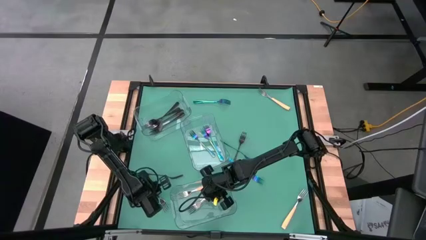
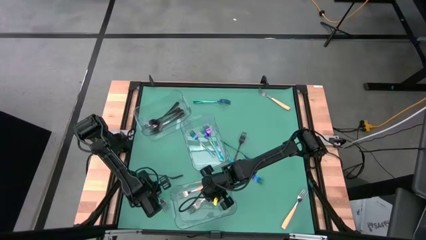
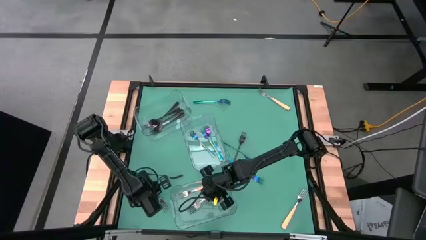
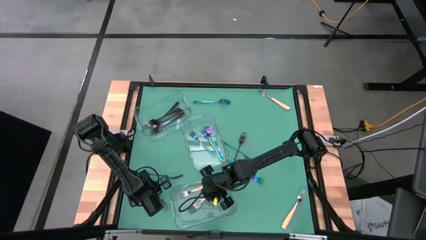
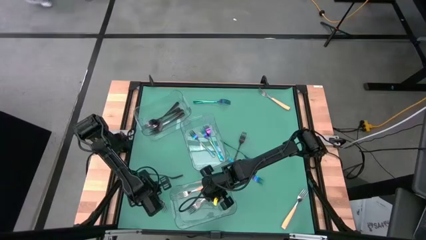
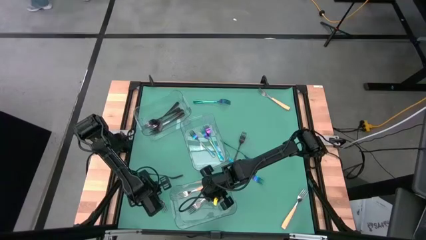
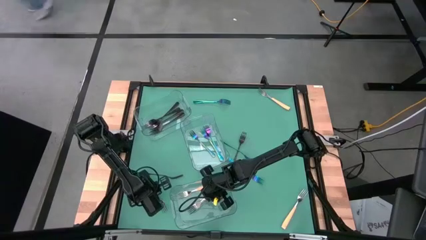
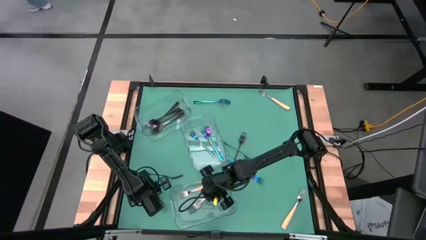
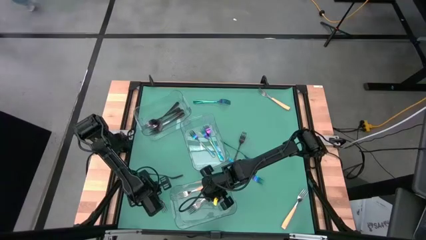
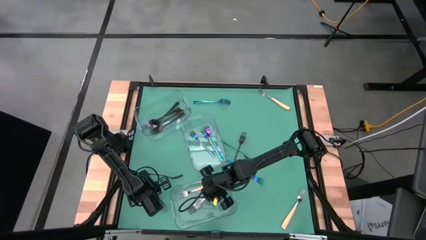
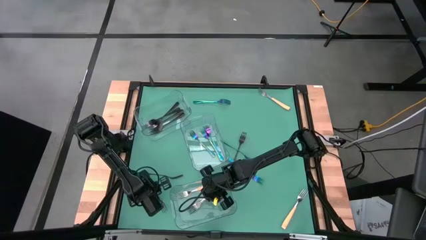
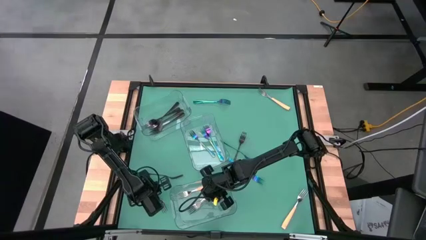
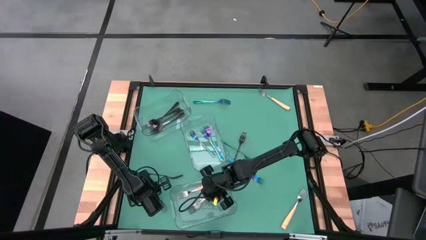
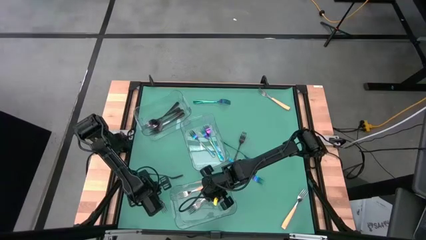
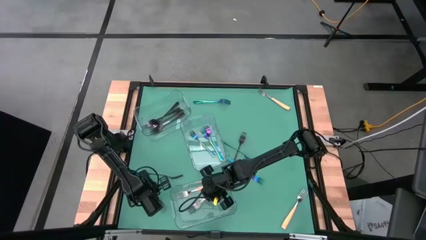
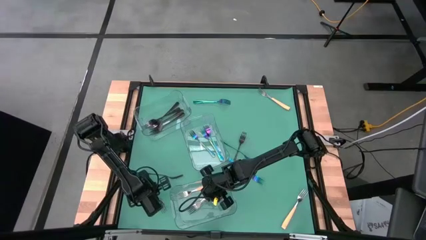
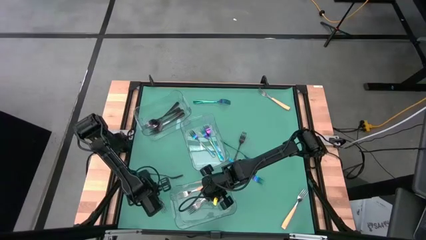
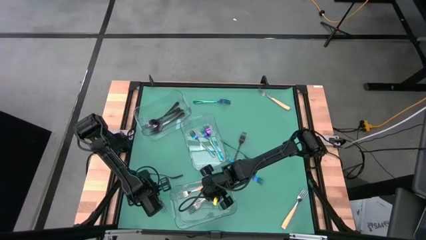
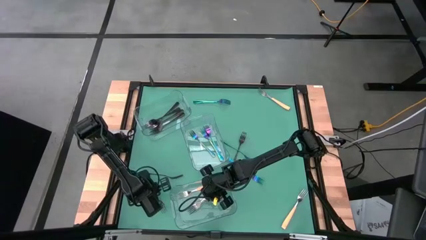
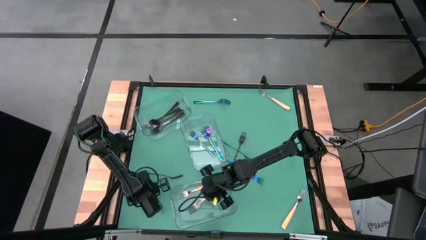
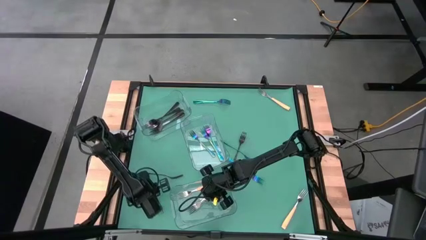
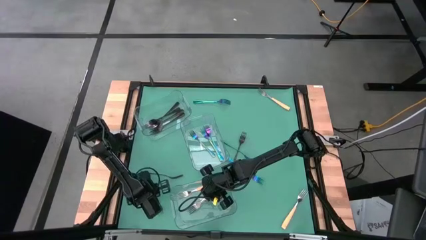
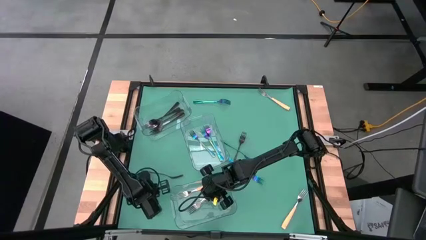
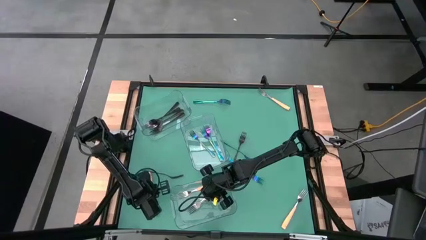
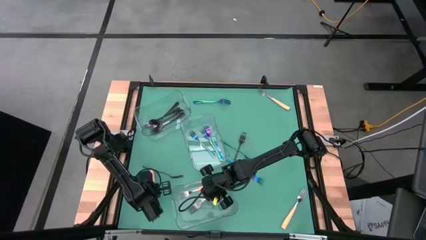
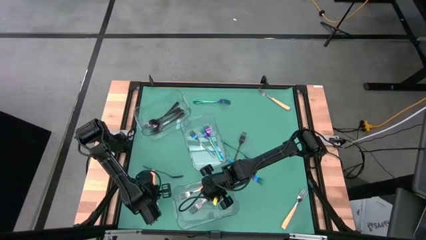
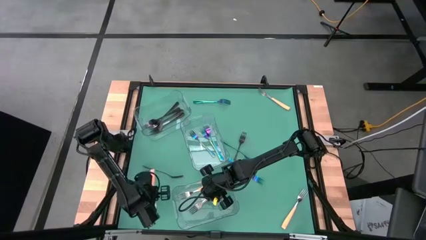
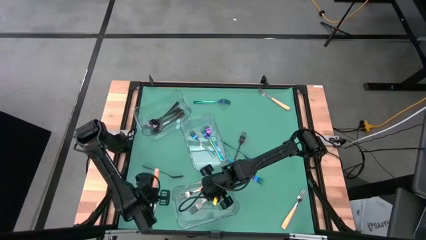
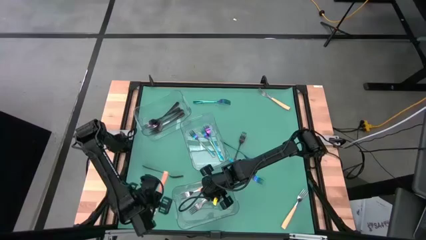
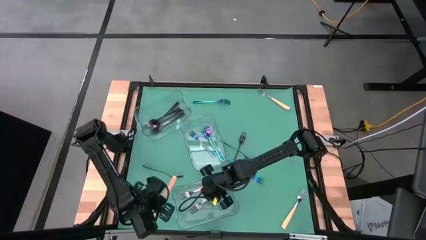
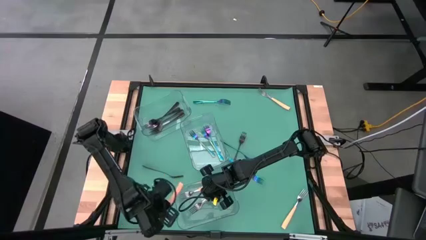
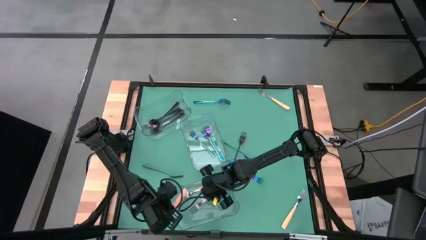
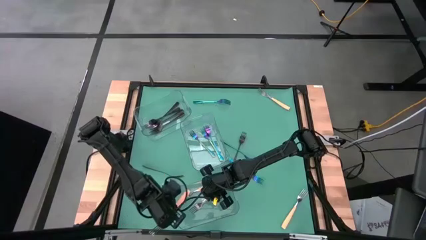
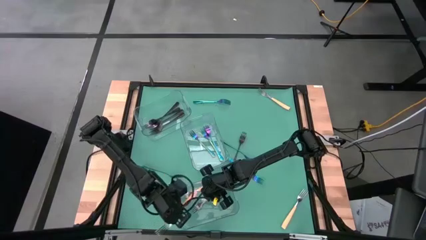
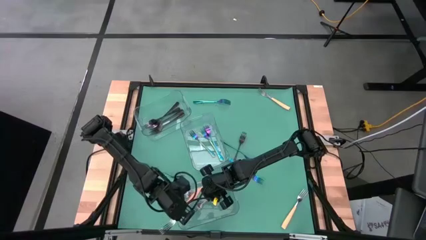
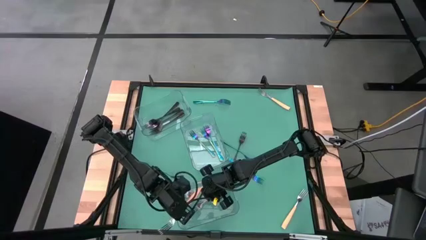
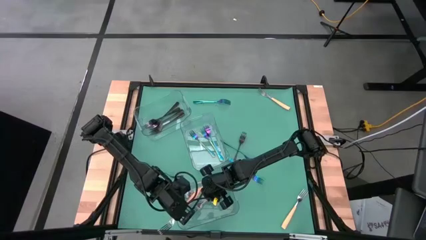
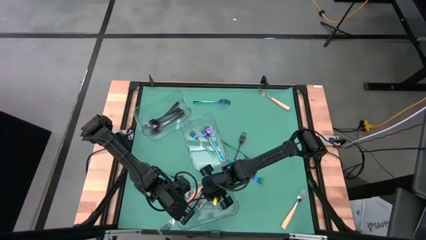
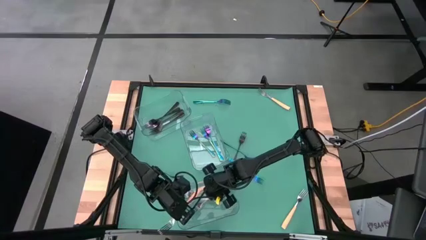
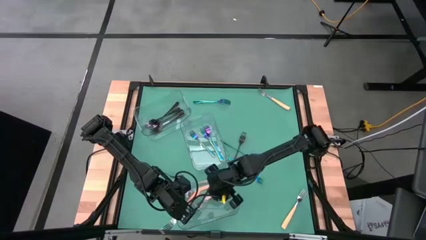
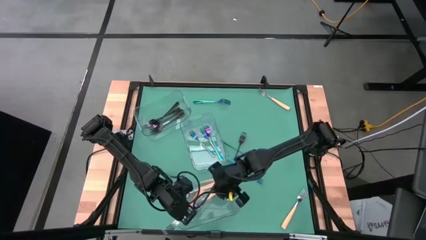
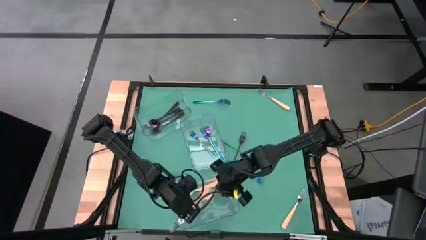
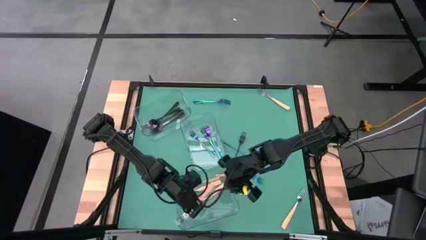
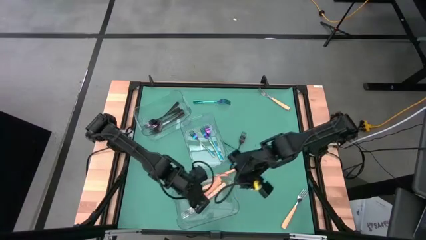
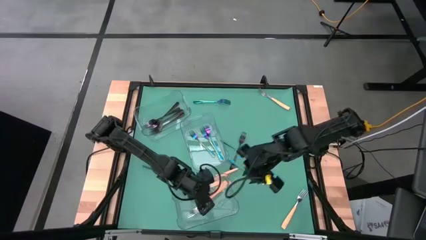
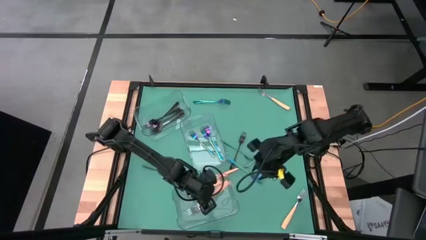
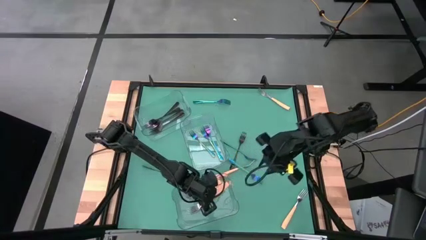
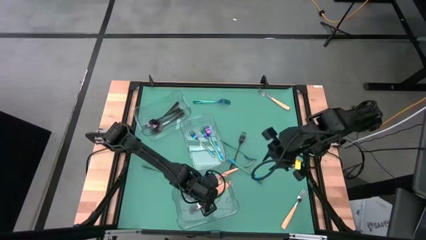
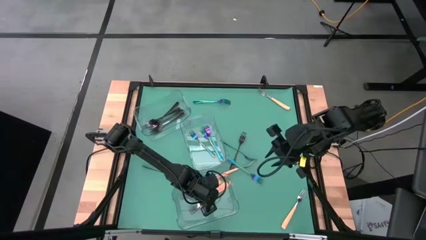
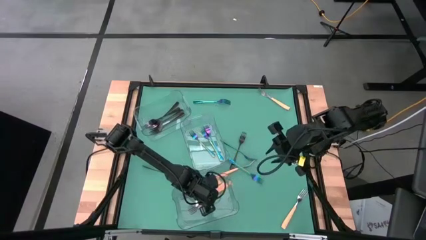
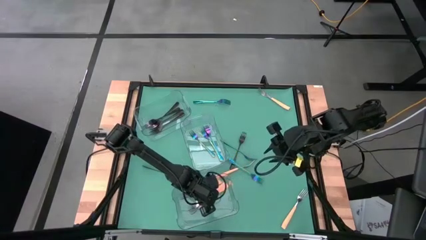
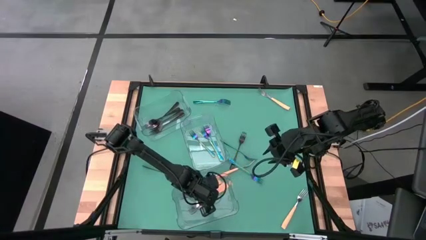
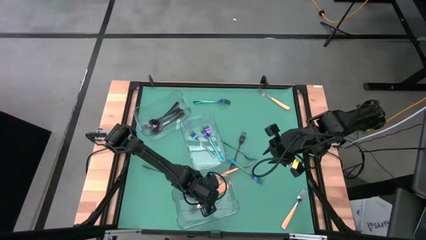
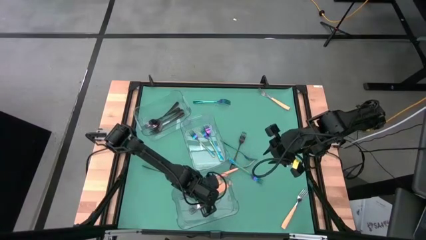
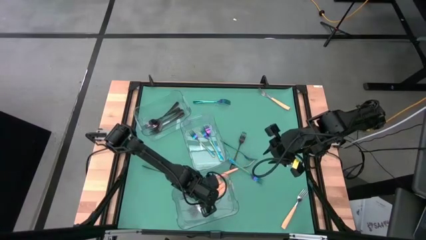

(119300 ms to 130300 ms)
Task: Sort silverware by color (type)
Put the yellow fork into the bottom transparent bin

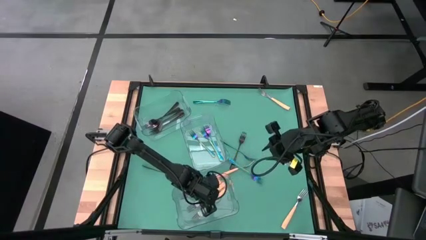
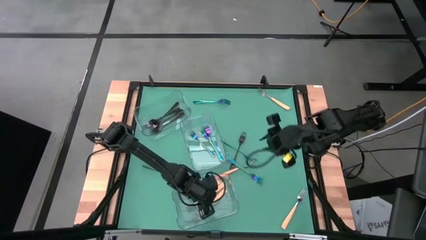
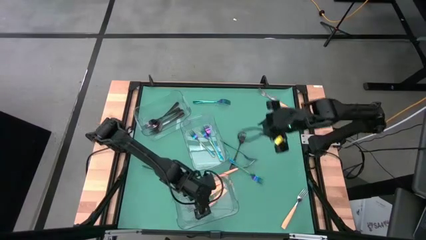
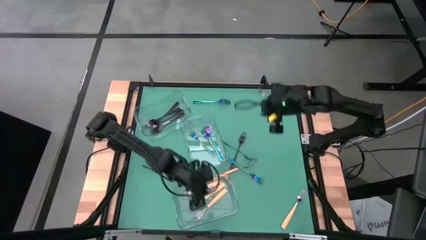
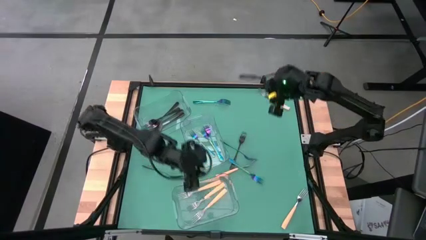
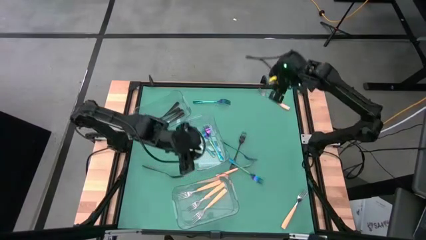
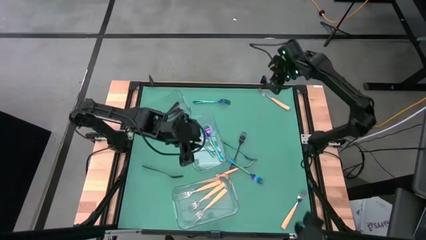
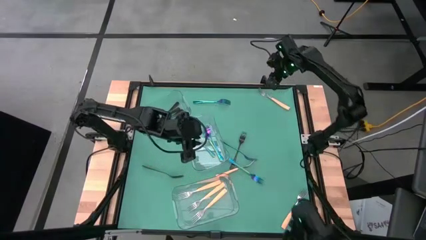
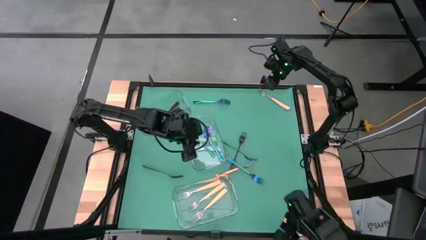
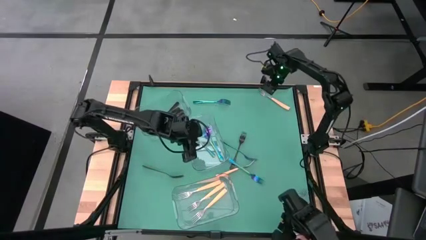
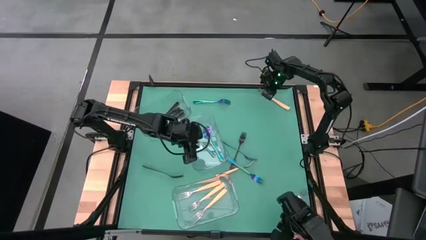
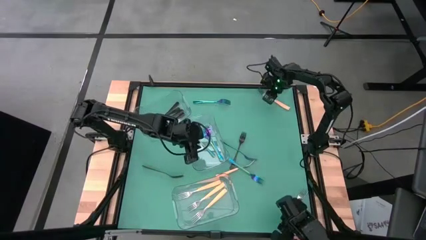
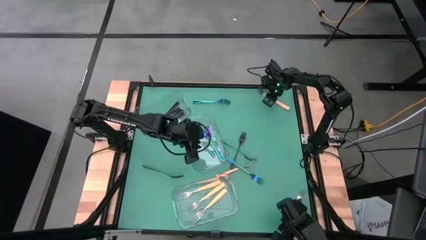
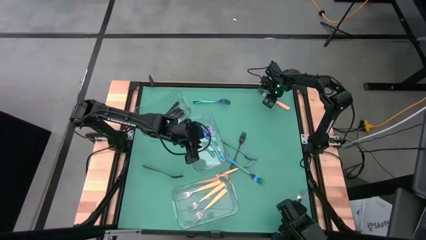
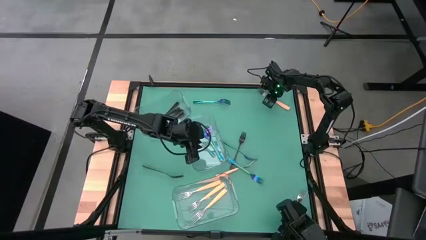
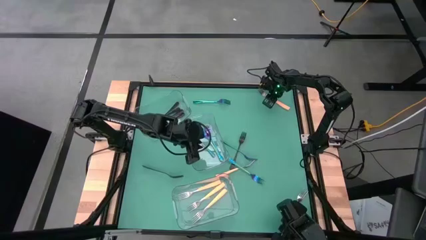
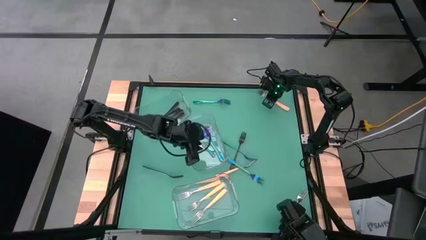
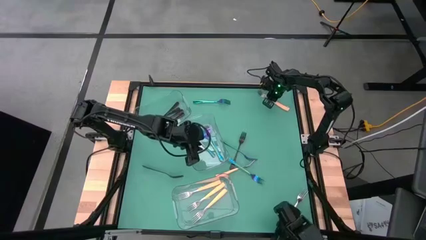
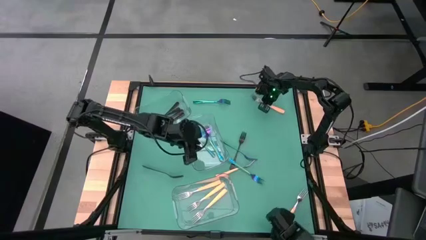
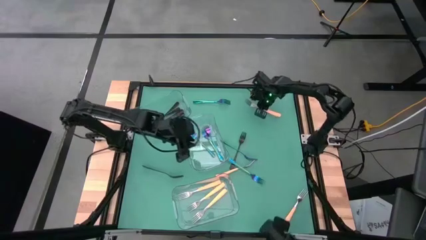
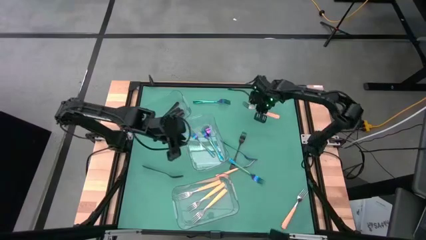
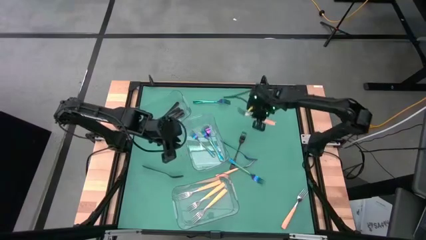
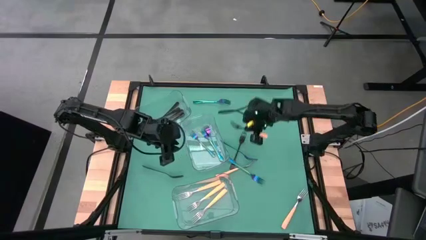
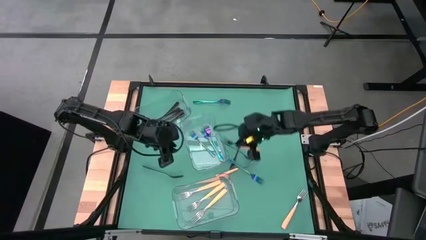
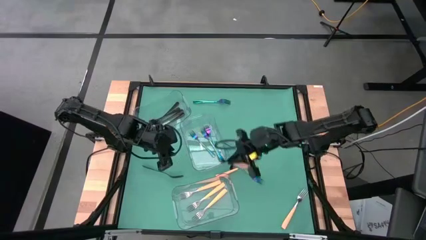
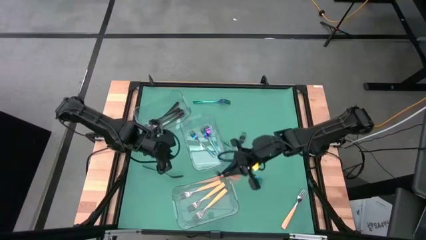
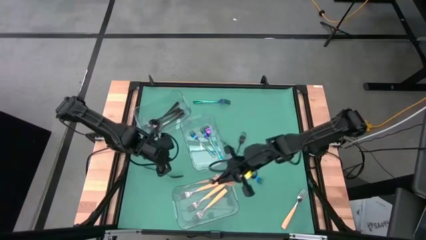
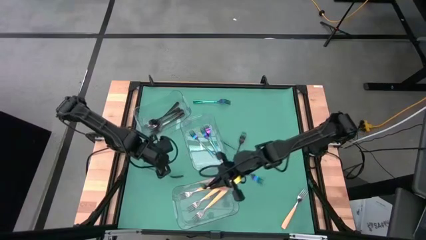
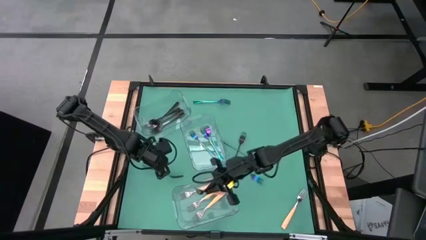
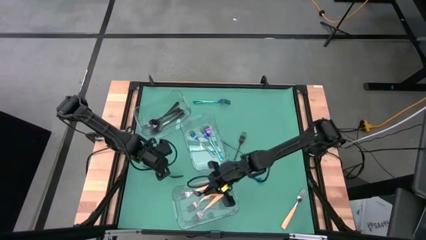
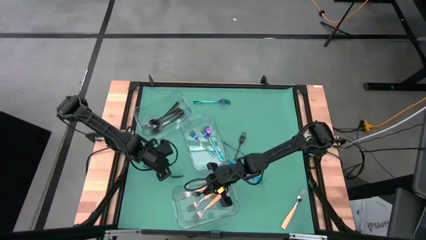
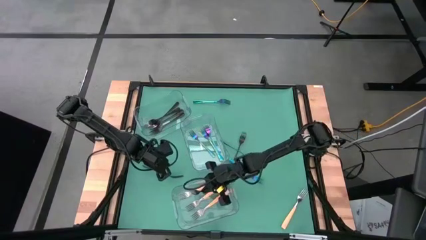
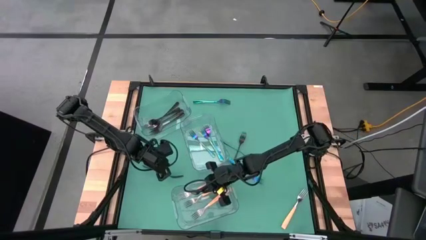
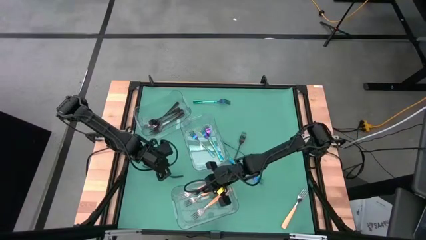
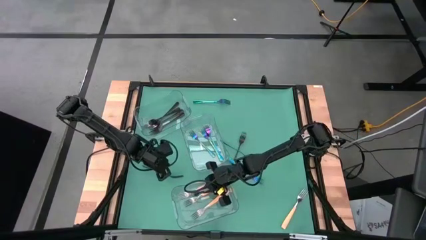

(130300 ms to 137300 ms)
Put the yellow fork into the bottom transparent bin
